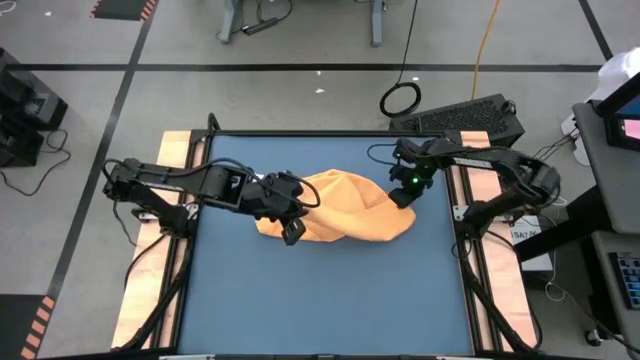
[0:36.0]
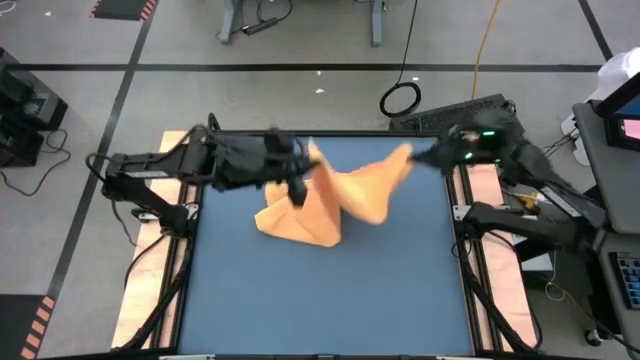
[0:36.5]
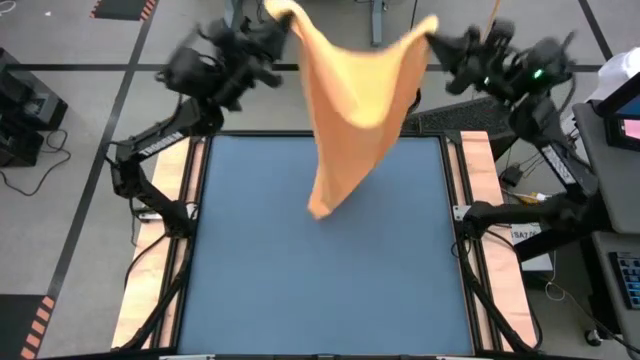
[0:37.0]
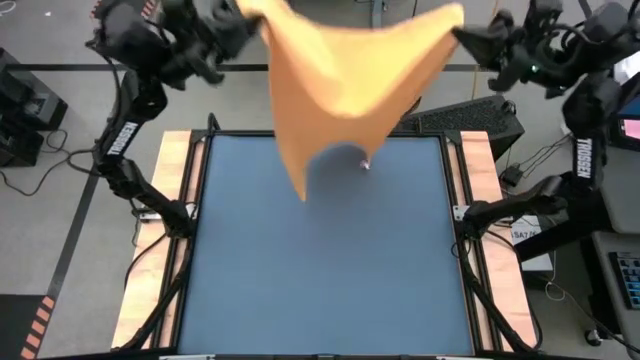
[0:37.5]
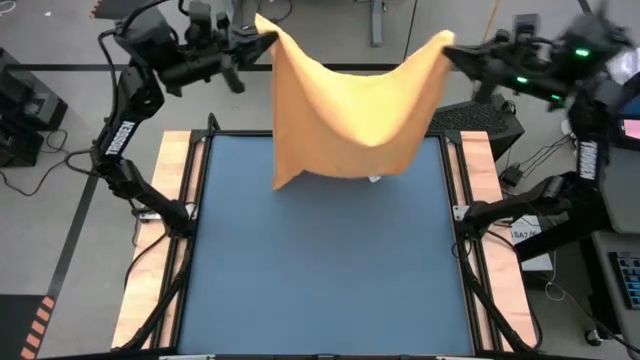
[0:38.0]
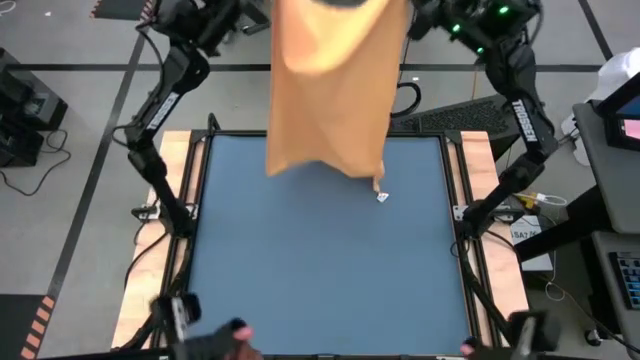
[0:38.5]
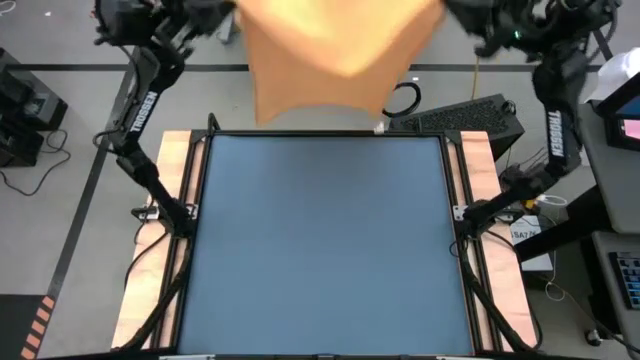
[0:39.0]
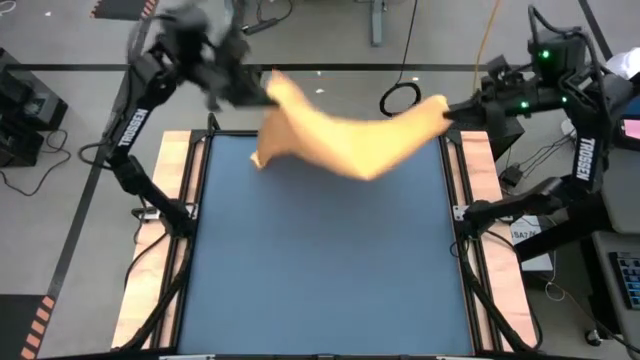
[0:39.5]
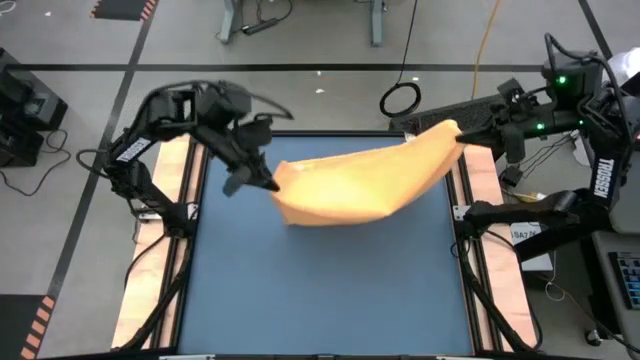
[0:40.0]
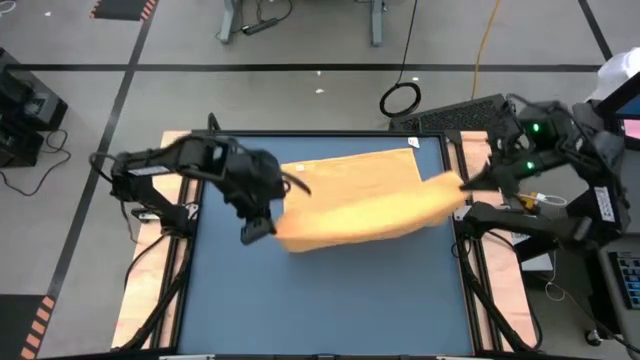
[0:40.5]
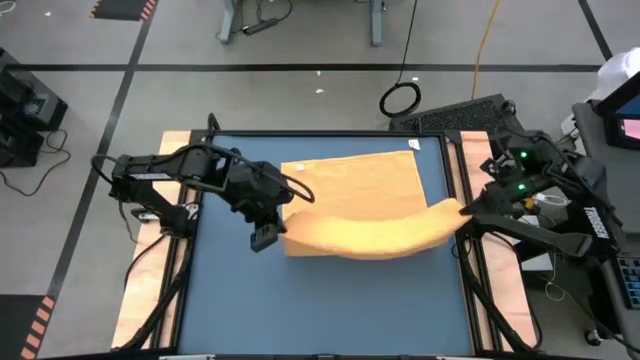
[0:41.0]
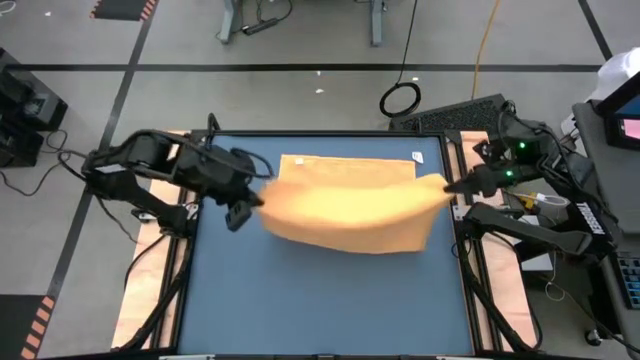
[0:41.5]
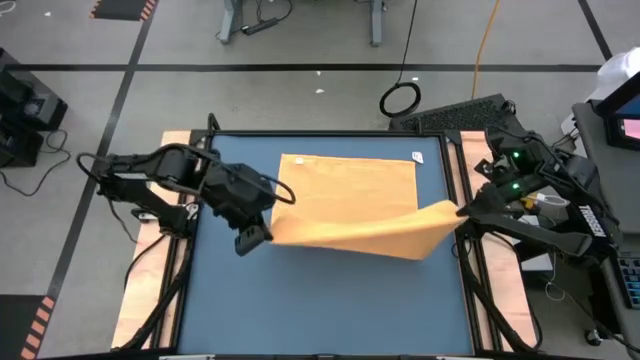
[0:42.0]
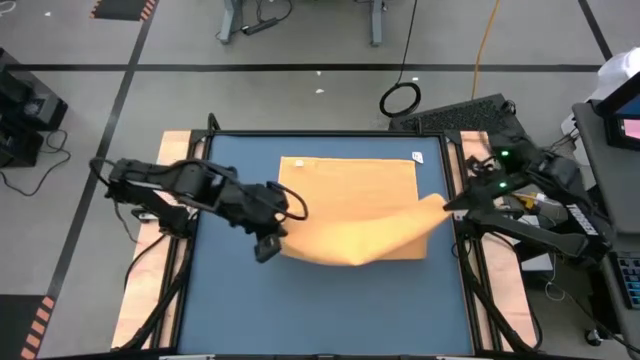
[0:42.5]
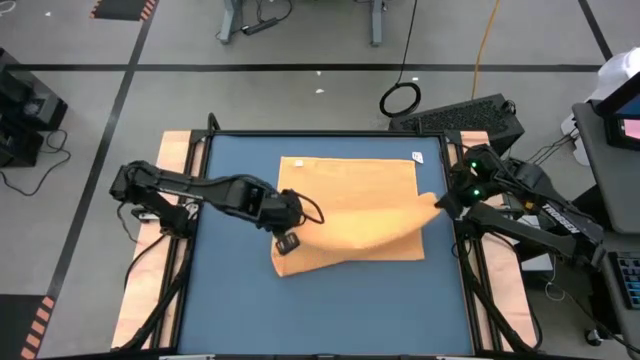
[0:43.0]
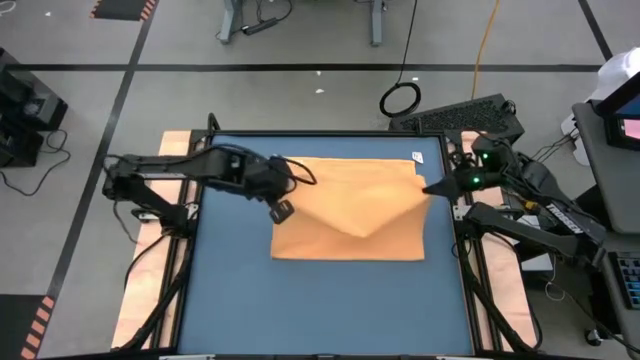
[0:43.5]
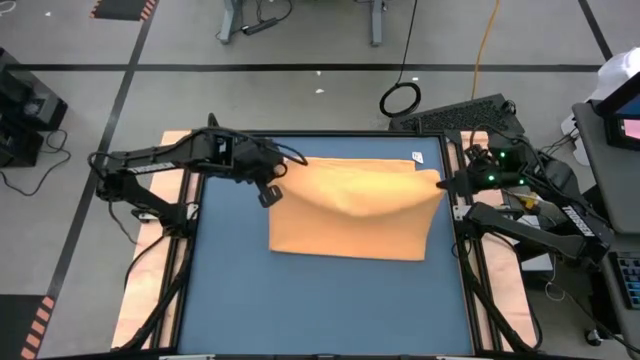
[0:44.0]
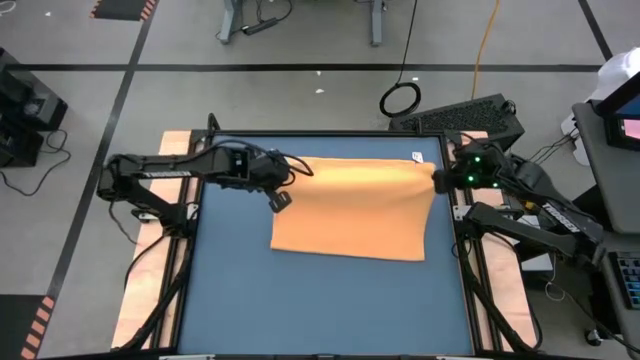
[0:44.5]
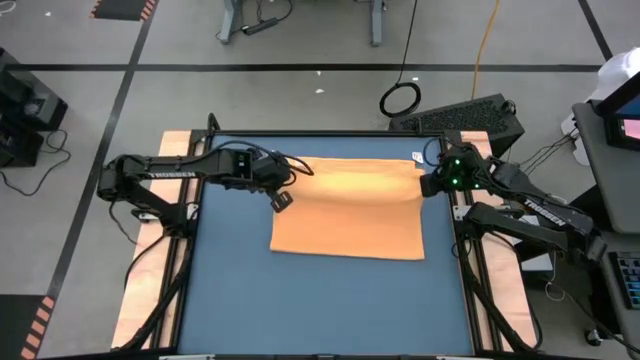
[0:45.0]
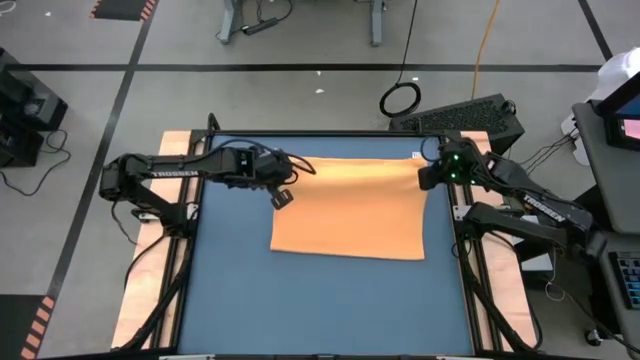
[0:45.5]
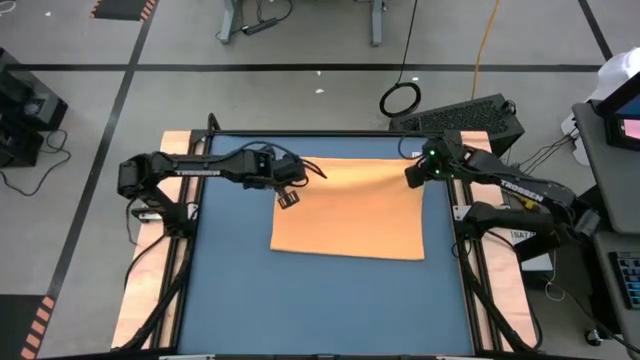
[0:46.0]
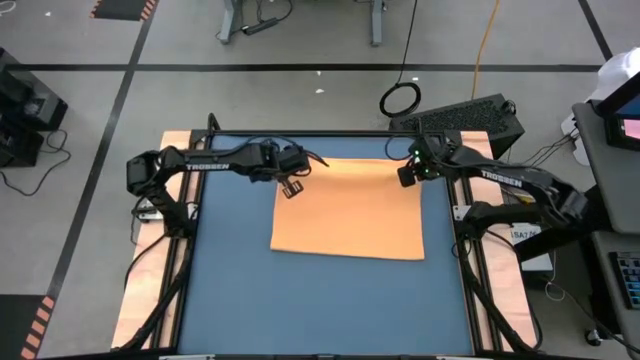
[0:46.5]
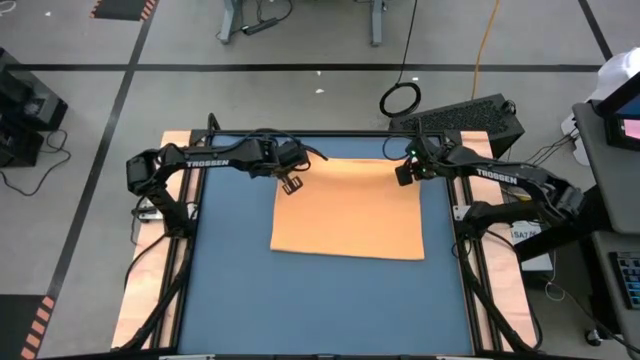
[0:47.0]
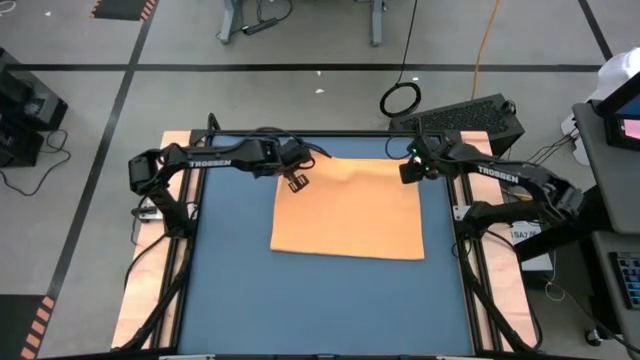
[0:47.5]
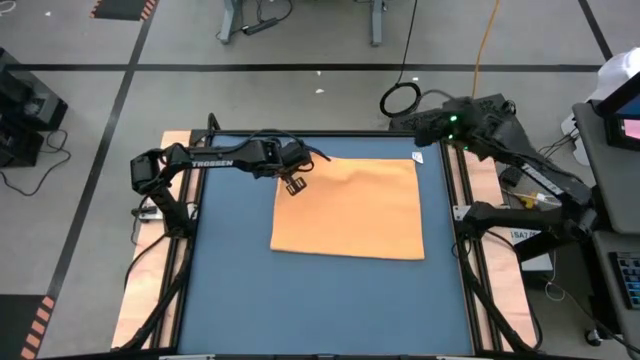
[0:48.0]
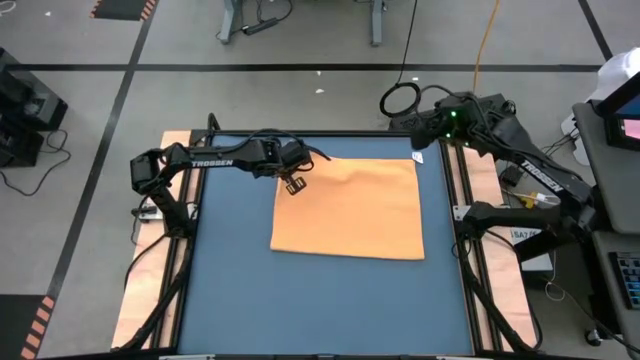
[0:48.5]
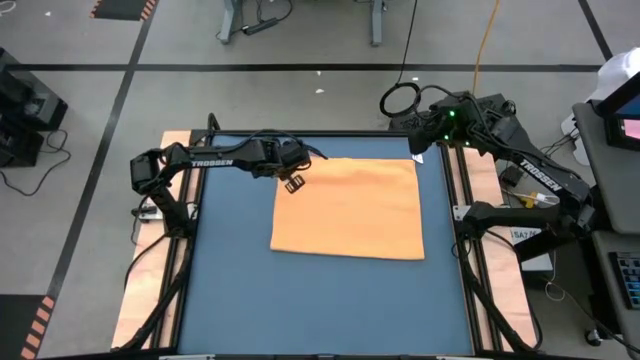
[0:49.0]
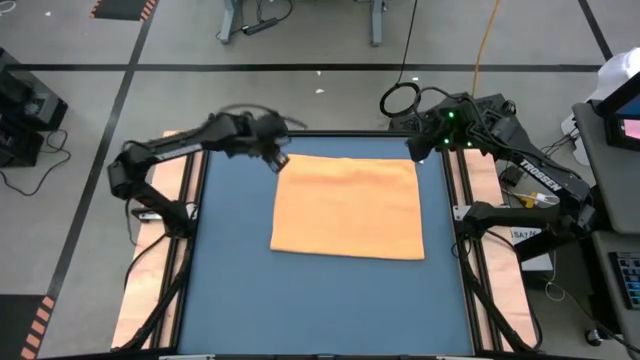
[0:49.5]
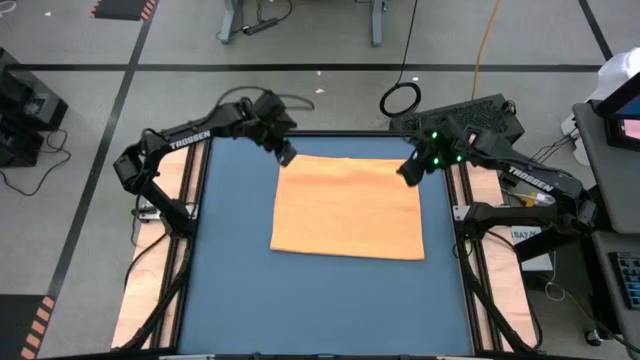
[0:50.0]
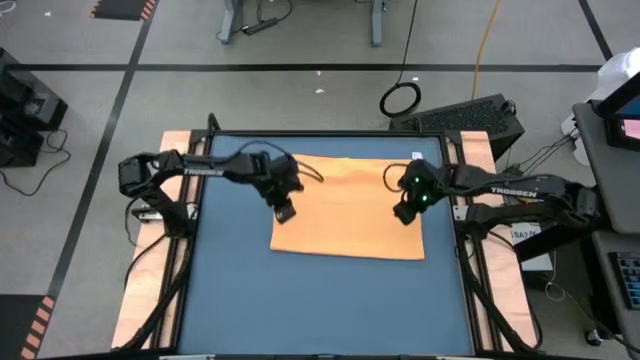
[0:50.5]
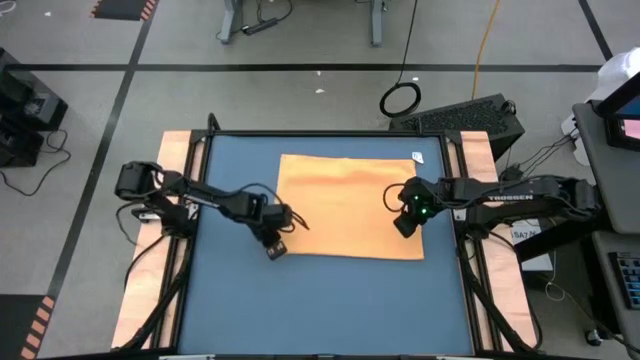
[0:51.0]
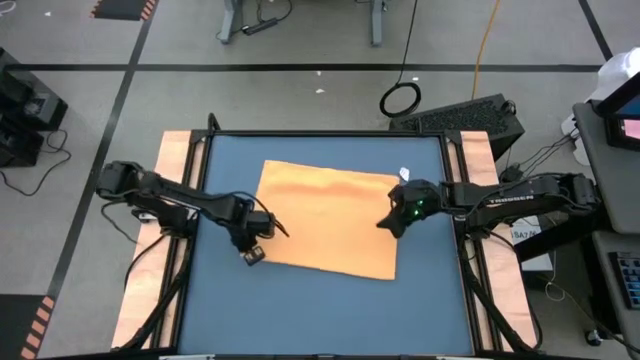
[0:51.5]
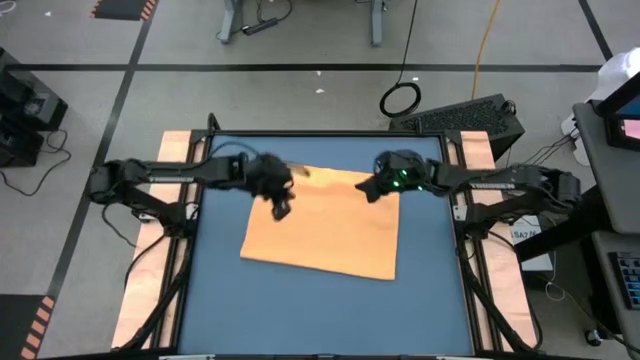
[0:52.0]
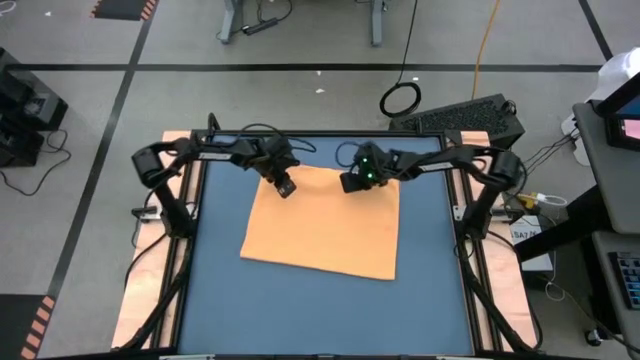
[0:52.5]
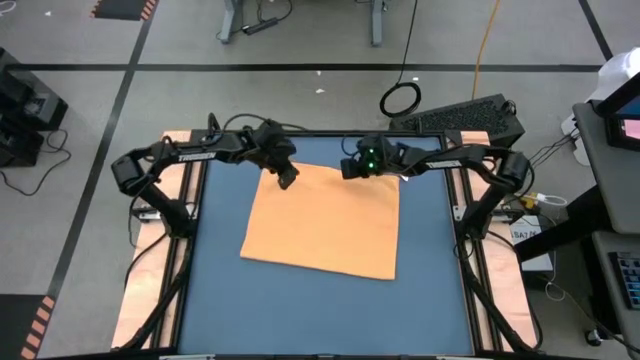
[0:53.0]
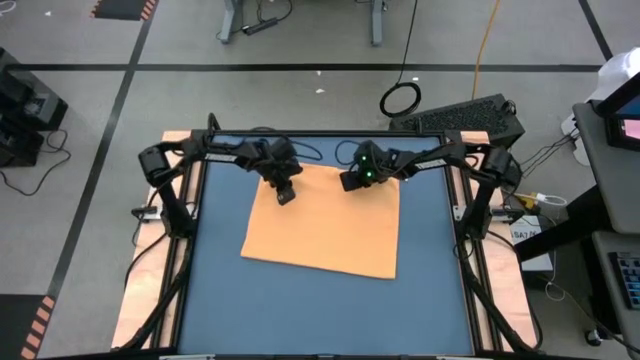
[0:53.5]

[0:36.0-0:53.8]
Task: Roll towel
Roll the yellow towel

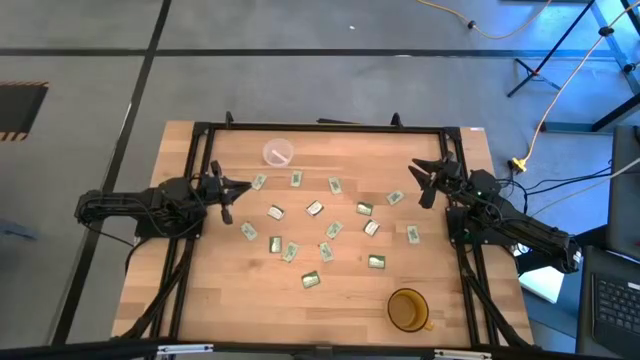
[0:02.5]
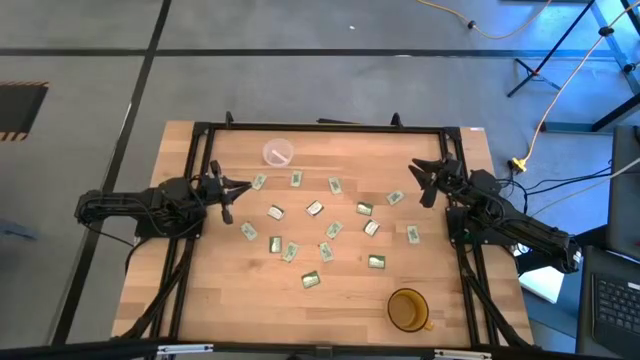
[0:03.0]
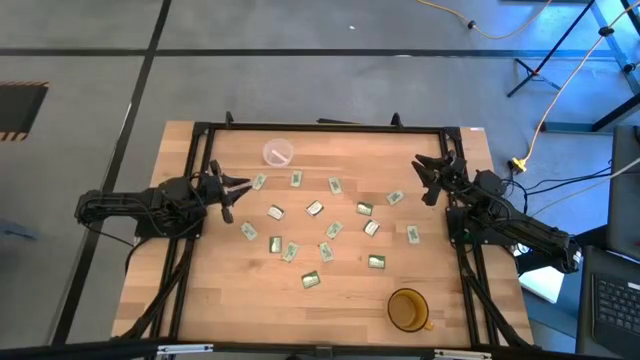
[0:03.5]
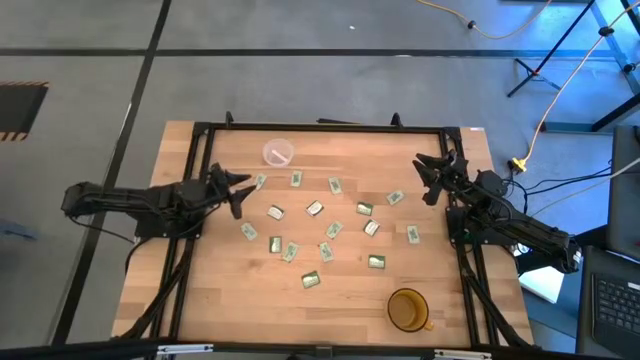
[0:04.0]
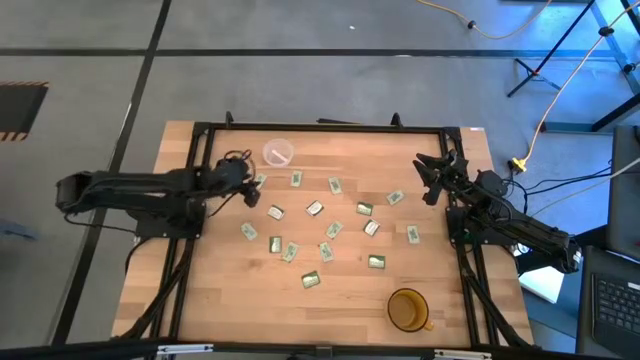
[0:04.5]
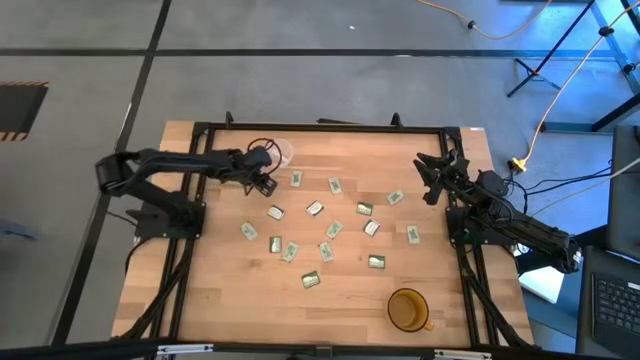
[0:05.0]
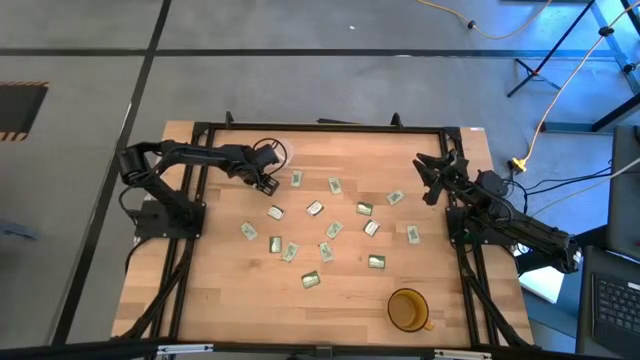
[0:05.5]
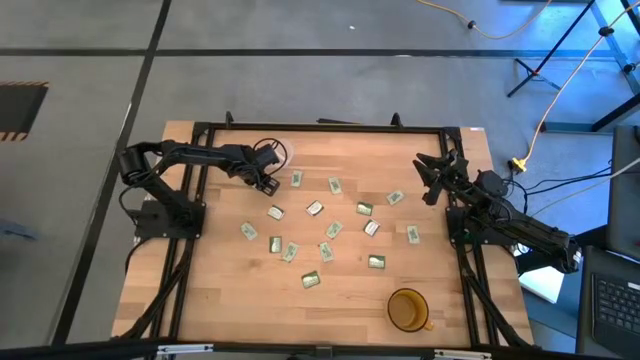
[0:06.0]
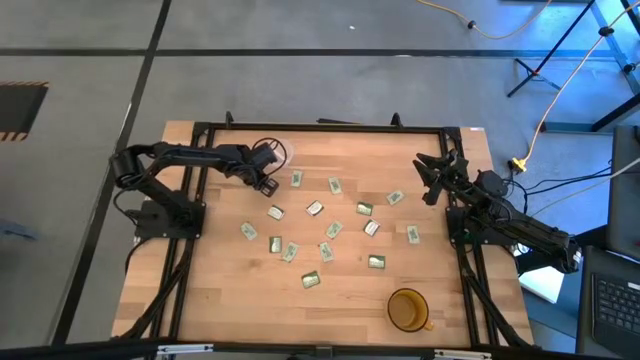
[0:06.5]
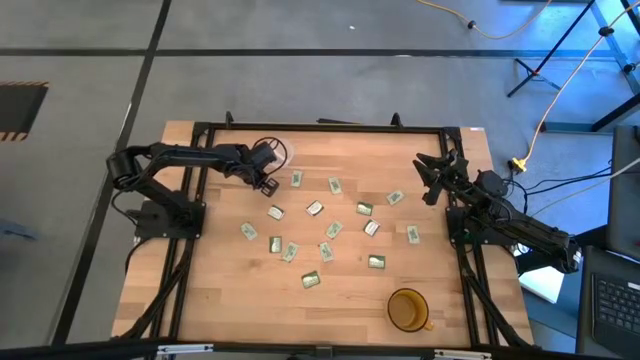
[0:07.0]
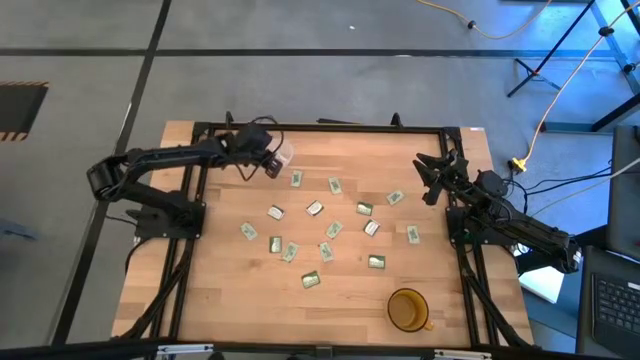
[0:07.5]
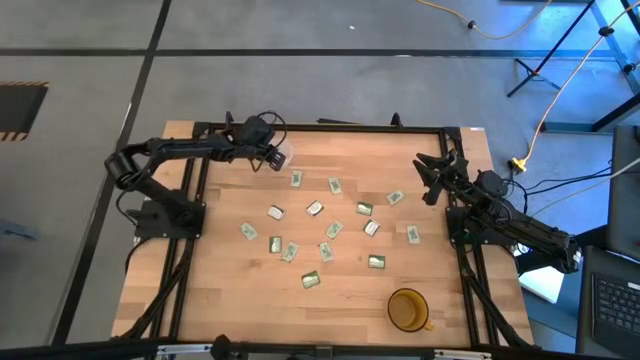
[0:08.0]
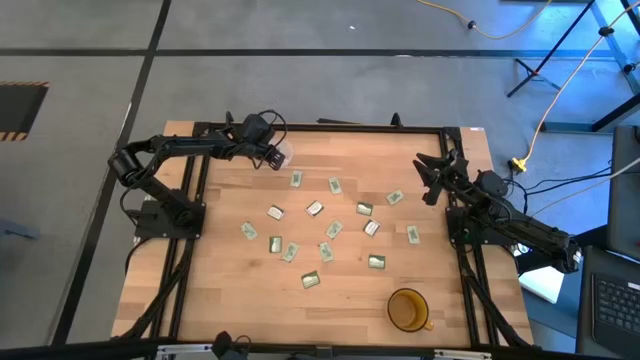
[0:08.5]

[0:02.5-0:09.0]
Task: Pick and place Stevia / Truvia into bins
Put the stevia packet into the transparent container
